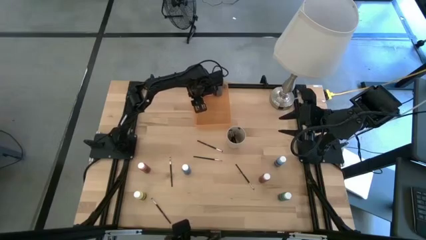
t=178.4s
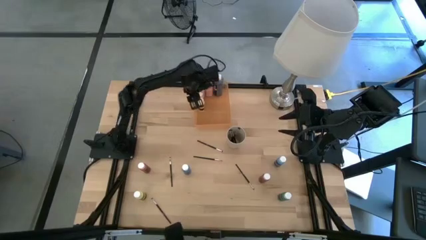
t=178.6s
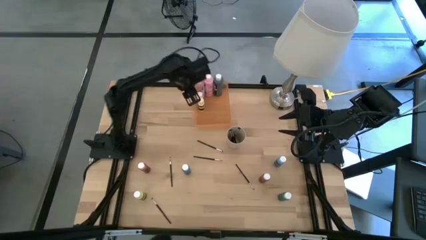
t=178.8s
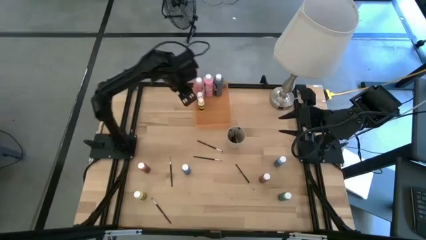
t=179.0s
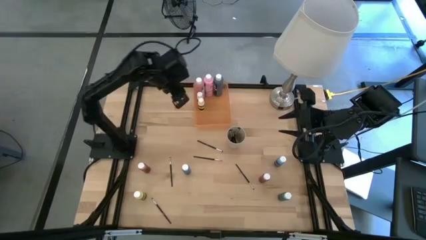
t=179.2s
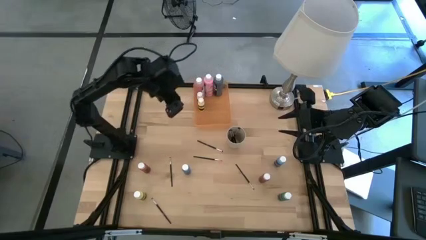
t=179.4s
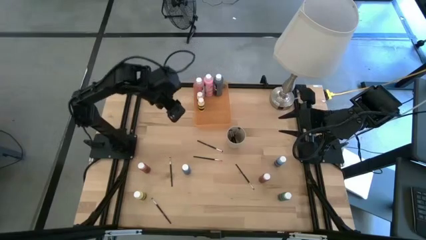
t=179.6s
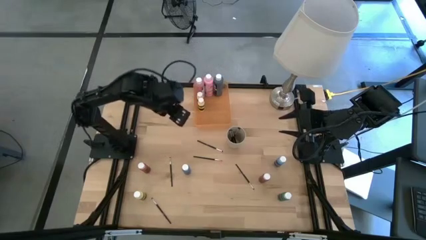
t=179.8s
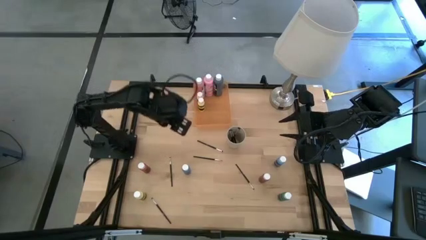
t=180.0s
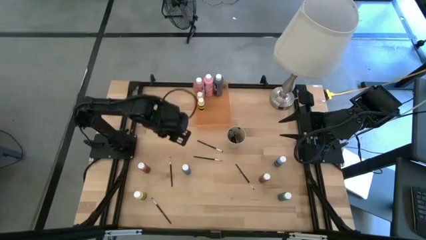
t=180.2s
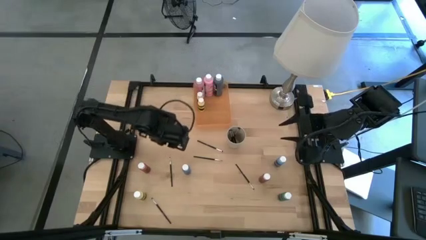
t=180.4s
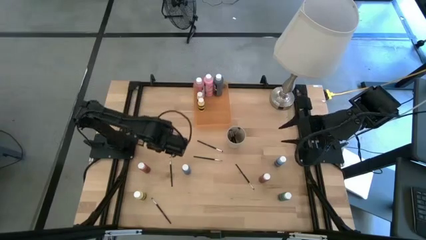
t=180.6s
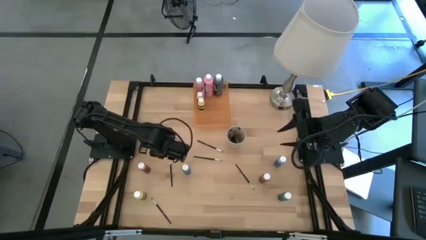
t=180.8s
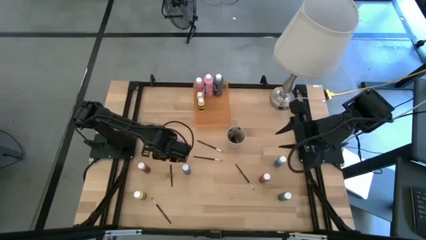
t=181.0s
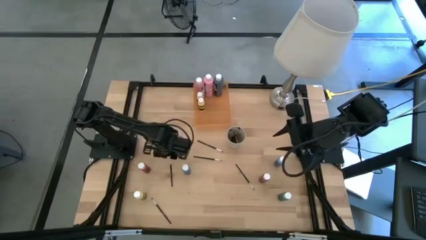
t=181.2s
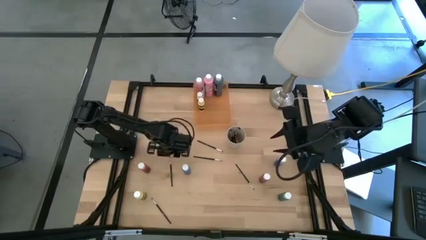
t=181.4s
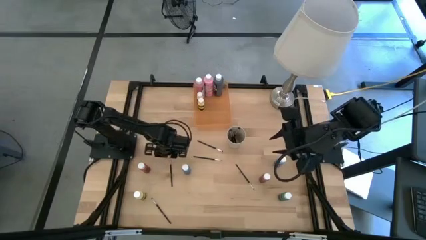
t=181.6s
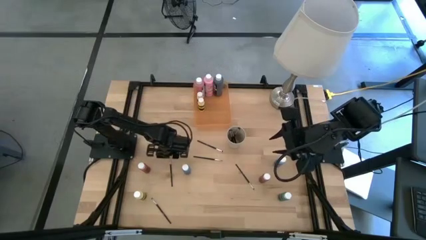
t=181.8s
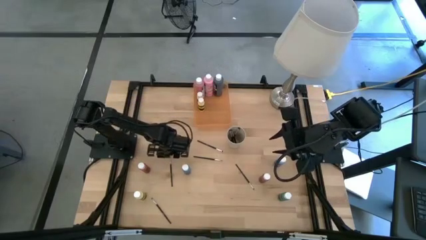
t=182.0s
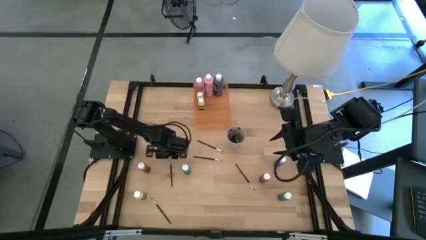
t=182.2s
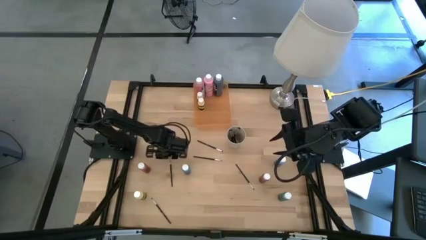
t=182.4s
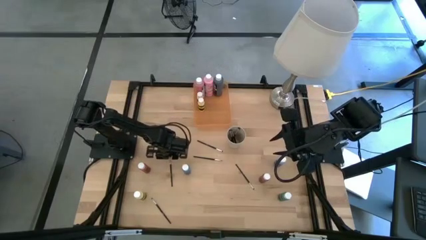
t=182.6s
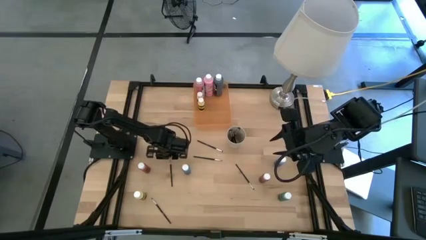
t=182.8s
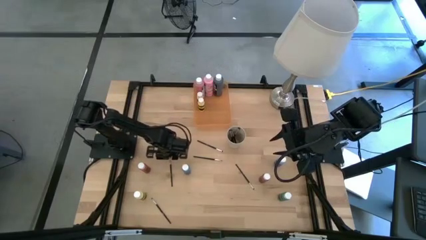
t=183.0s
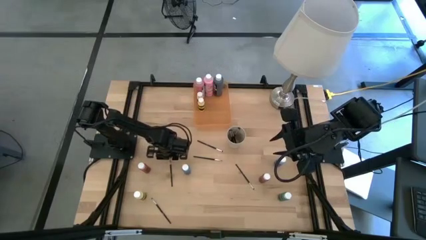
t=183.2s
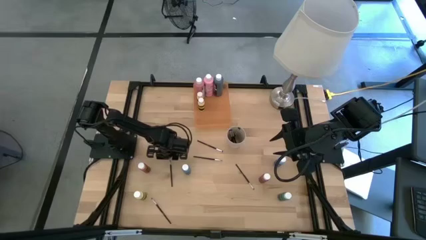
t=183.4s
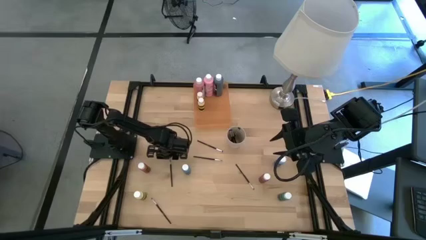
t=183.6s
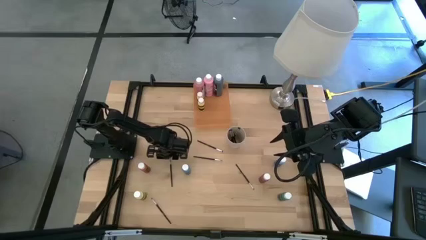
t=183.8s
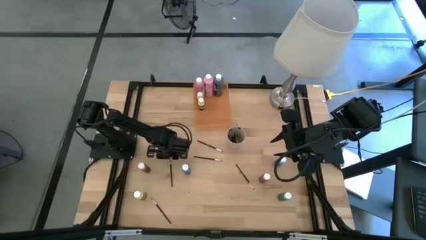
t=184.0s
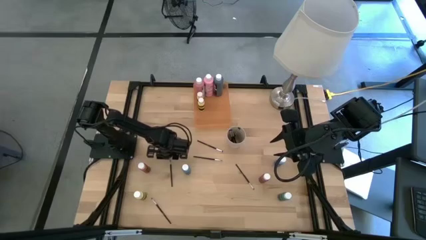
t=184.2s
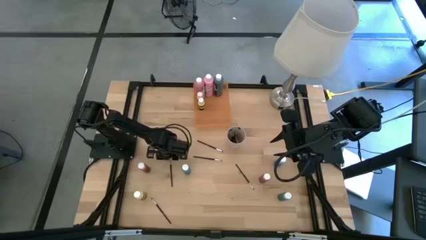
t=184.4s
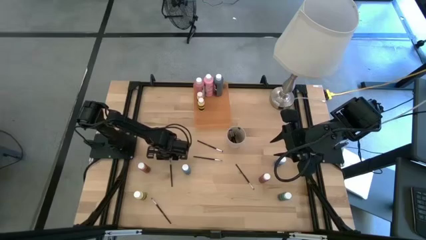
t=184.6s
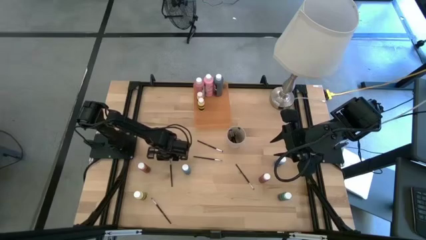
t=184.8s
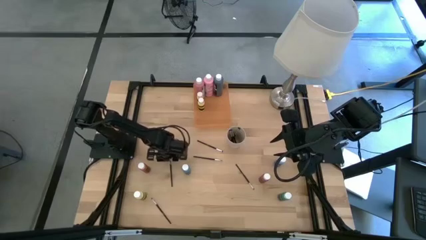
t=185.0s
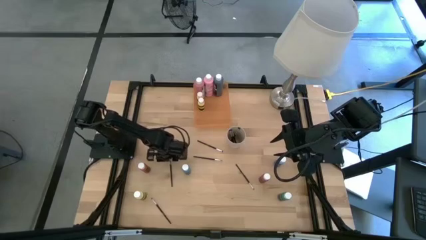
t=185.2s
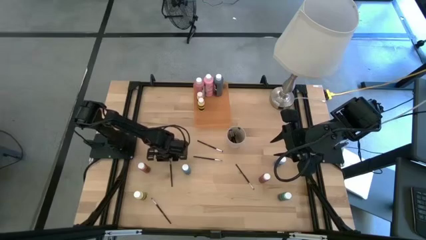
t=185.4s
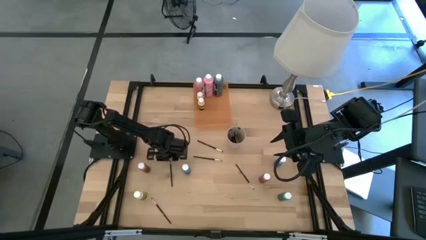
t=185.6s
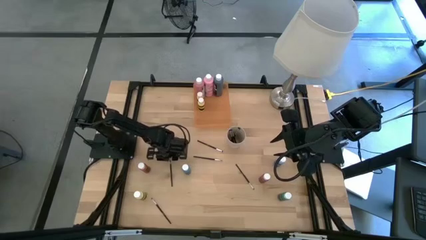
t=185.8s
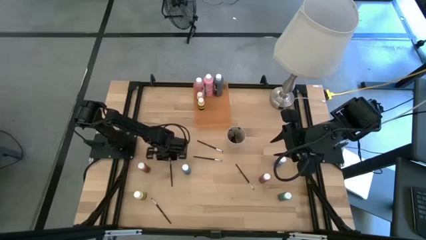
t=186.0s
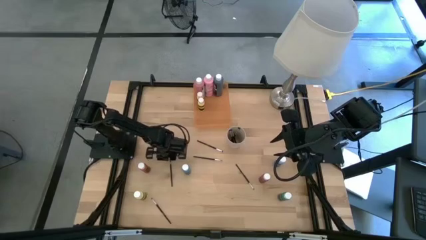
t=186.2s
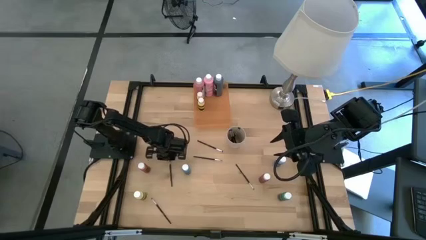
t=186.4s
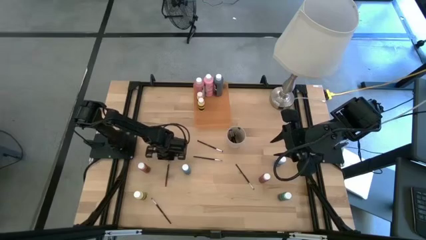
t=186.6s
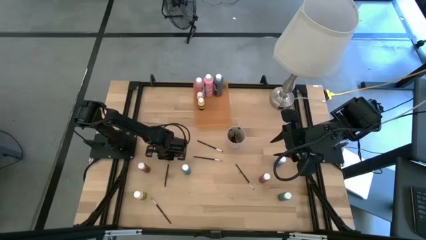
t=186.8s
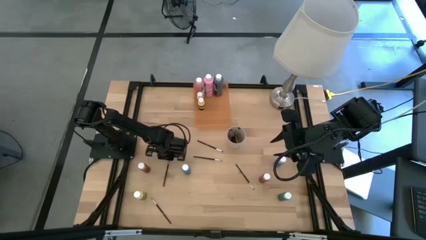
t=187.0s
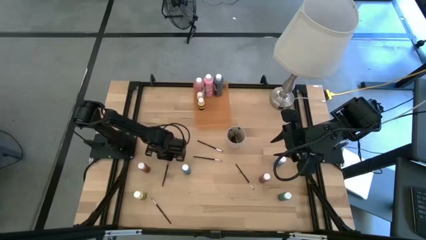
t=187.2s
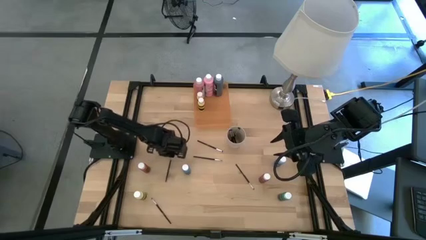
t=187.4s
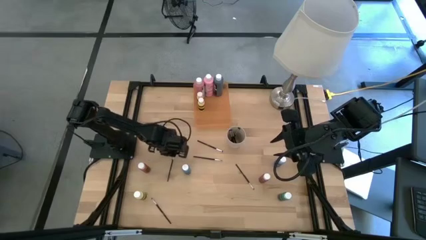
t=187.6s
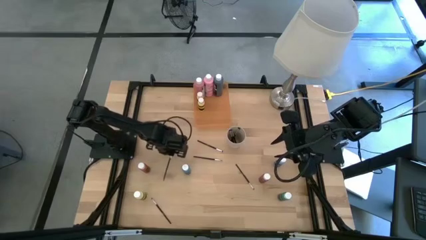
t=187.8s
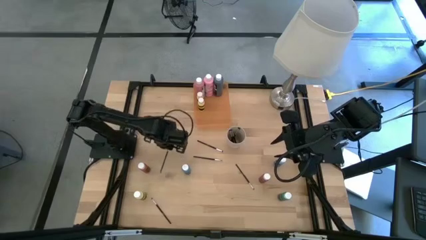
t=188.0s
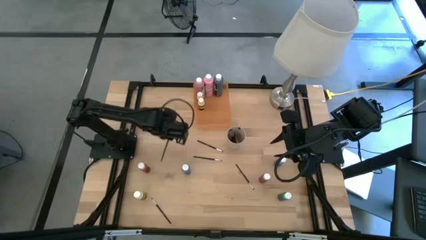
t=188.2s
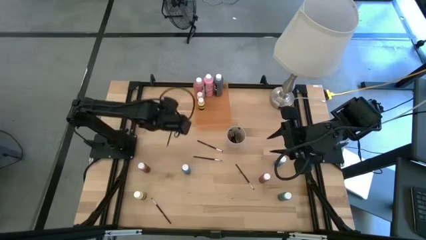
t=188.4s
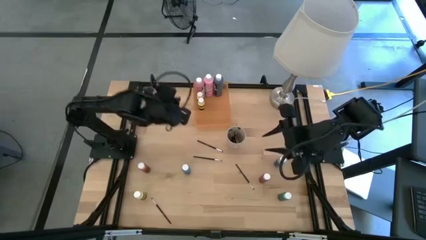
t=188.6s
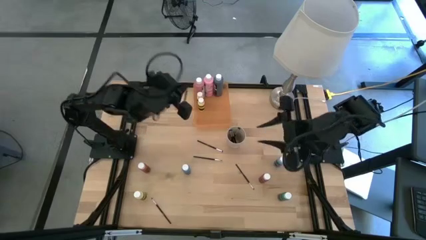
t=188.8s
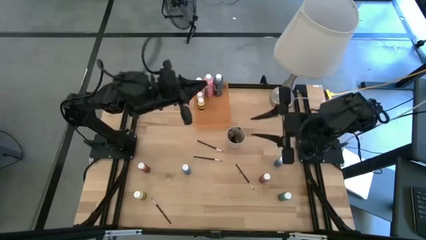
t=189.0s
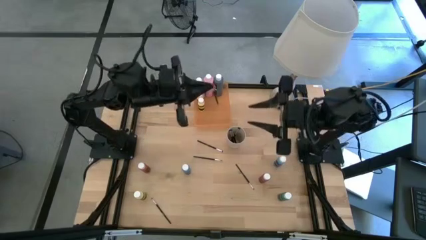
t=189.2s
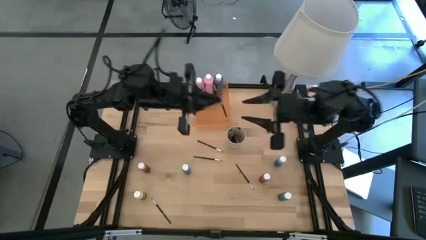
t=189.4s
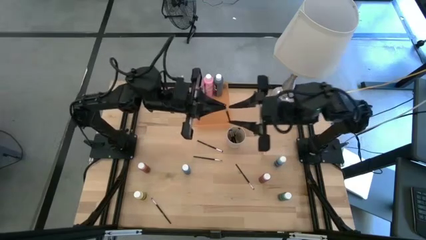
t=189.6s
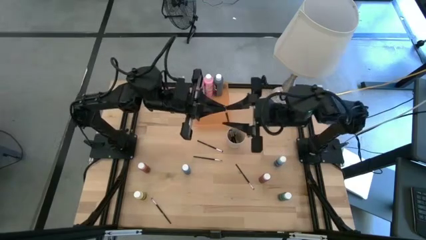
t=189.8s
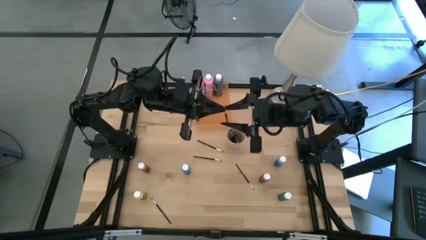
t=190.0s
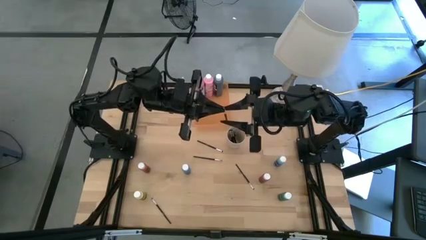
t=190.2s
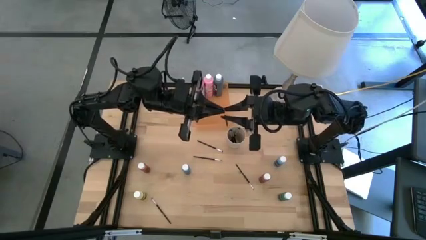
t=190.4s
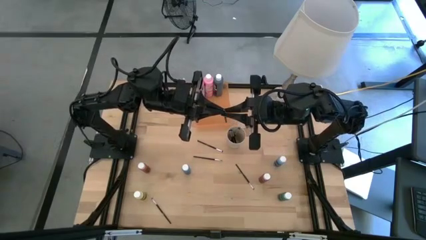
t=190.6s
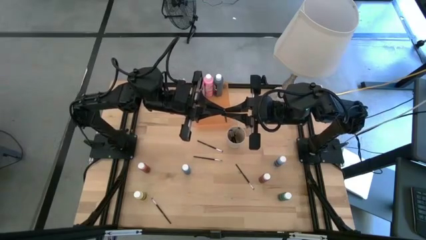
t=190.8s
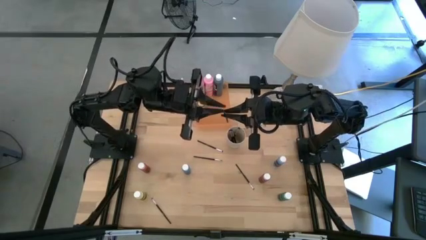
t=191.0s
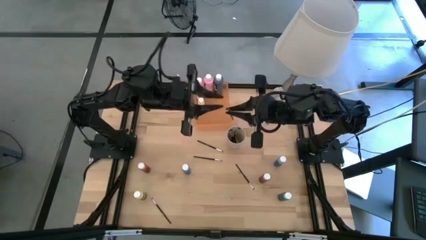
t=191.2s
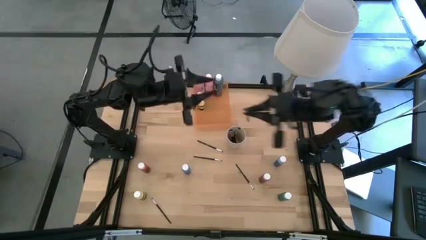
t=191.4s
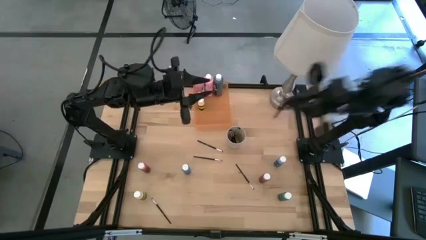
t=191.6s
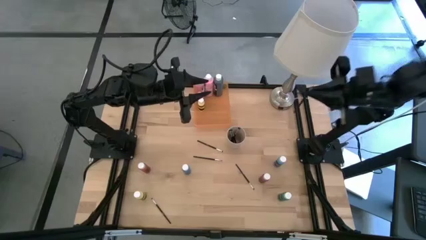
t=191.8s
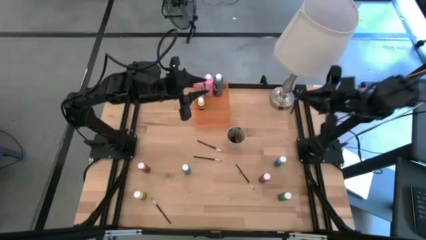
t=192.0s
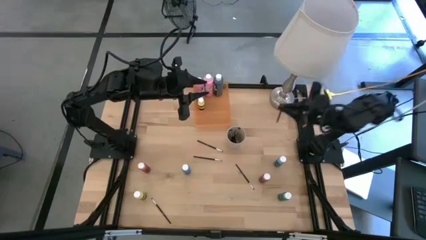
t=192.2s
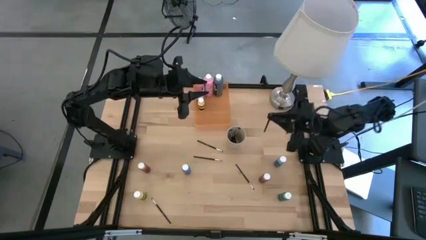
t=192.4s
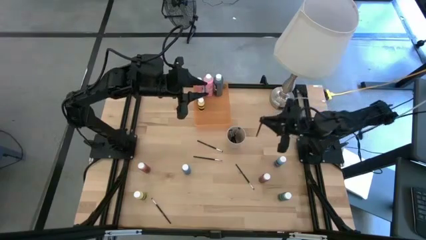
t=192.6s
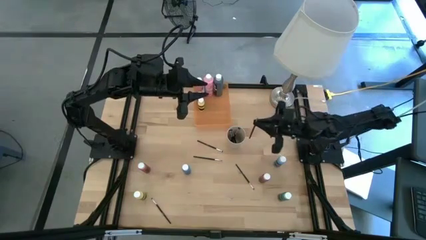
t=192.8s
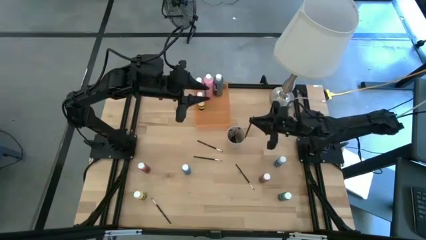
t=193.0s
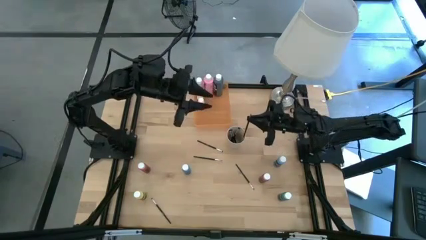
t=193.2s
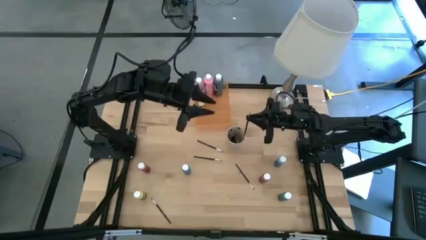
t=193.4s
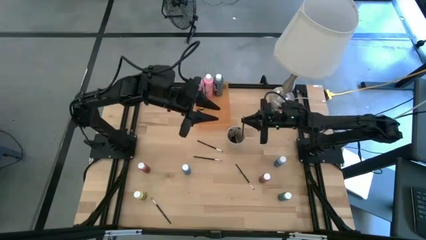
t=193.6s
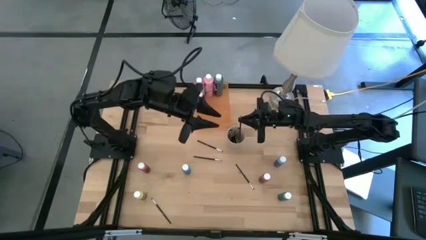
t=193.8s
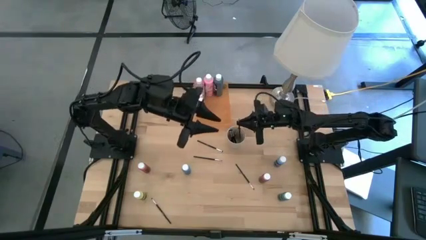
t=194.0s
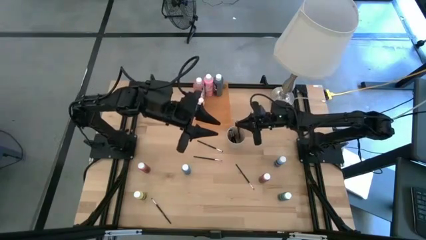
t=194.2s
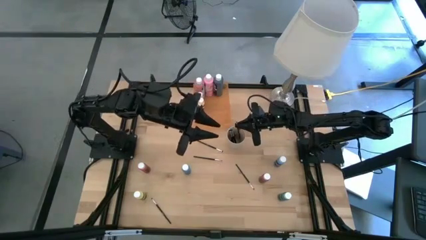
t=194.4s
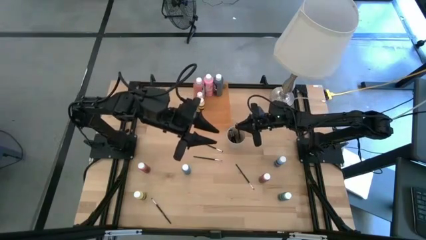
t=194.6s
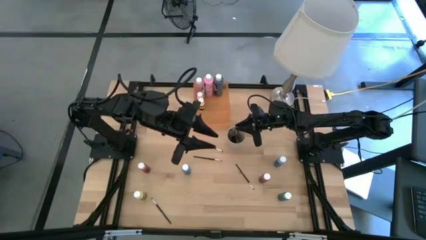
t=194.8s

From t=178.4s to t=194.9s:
Task: Pick & Place Paint Supplies
Put the black paint brush into the light brown cup

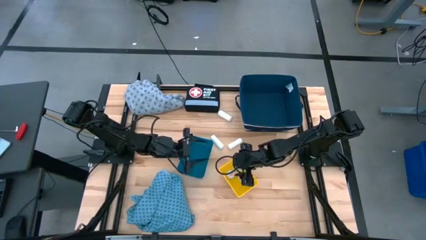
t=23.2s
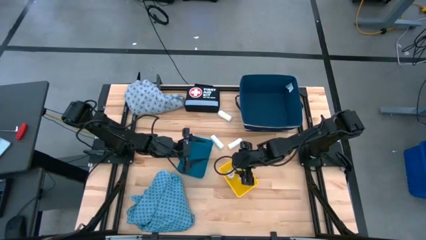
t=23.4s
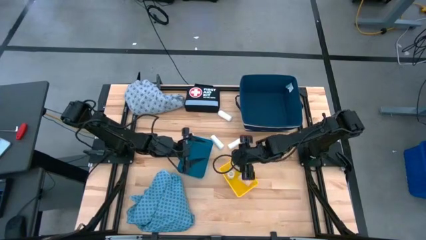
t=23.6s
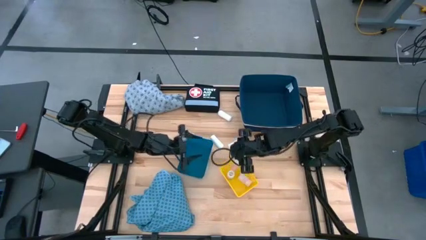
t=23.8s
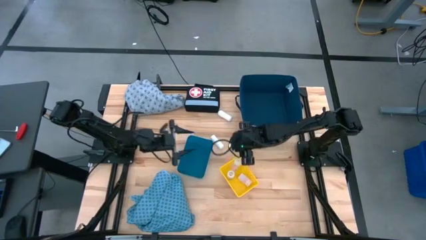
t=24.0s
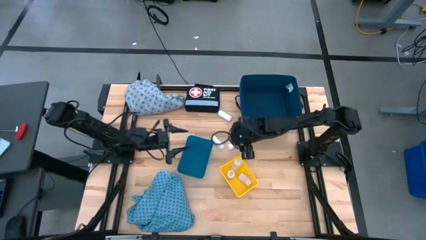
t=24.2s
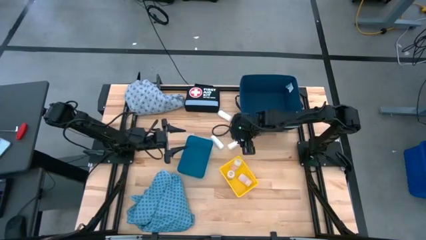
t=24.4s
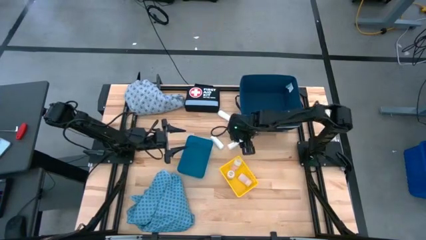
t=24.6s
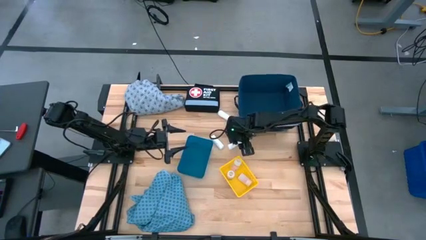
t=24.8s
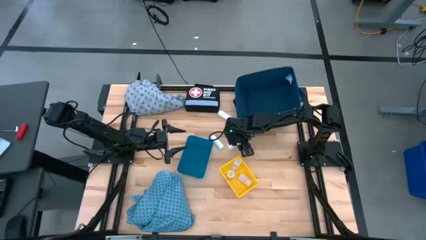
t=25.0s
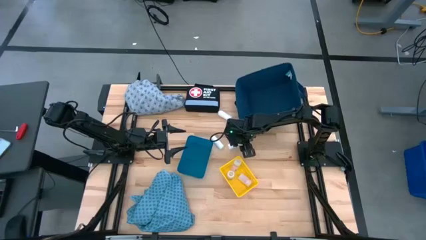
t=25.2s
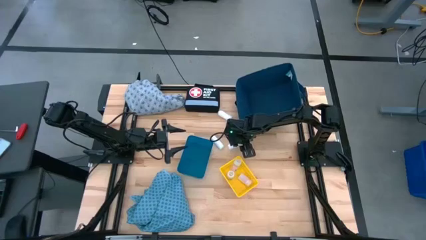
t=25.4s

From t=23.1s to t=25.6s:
Task: Pick & place medical supplies in basket/bin
Put the bottom right rolled gauze into the blue bin
